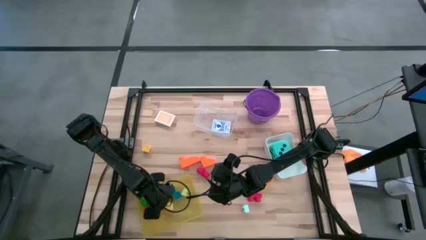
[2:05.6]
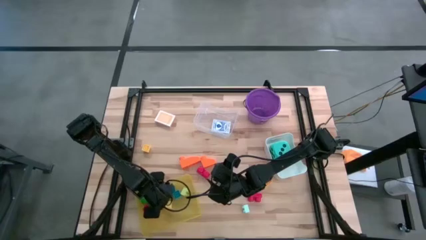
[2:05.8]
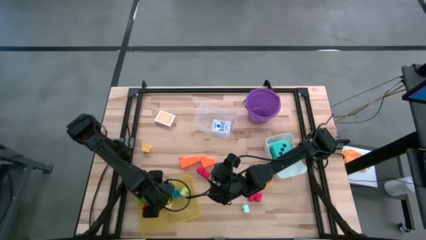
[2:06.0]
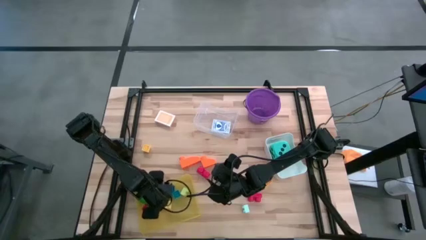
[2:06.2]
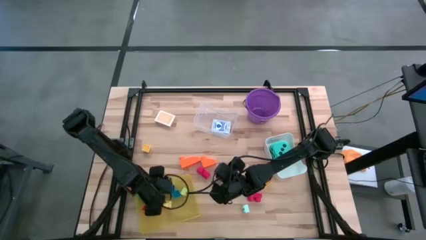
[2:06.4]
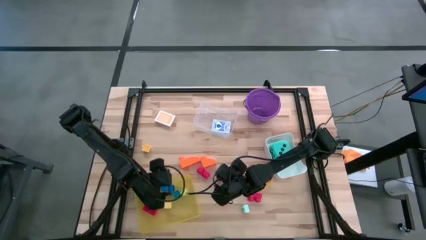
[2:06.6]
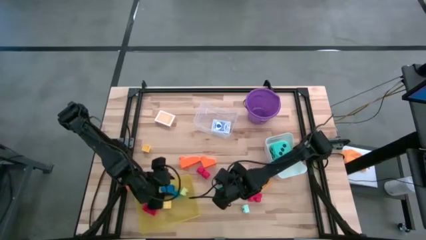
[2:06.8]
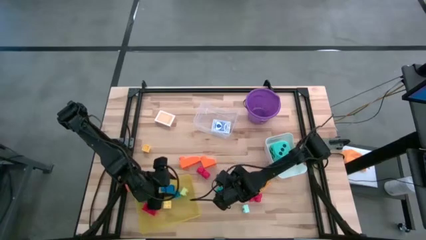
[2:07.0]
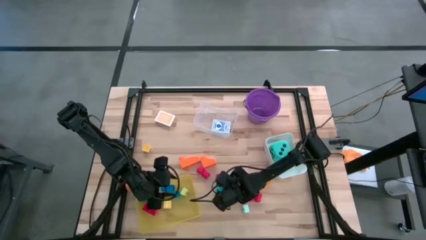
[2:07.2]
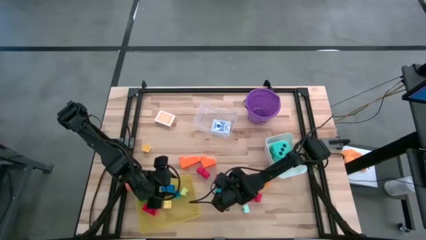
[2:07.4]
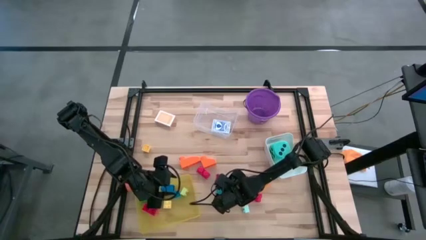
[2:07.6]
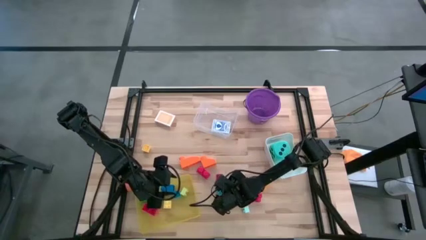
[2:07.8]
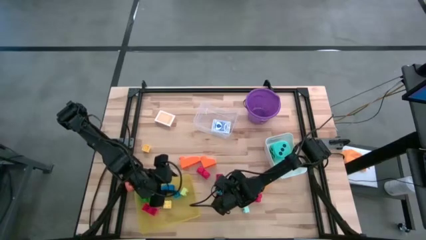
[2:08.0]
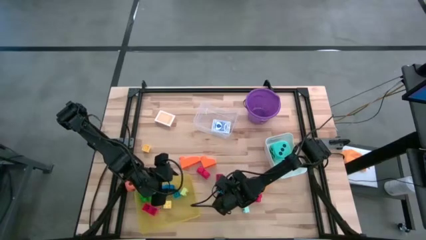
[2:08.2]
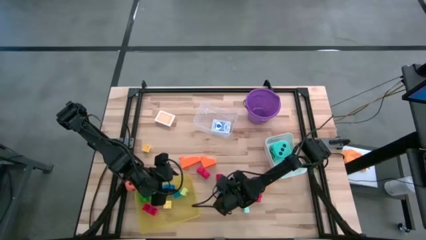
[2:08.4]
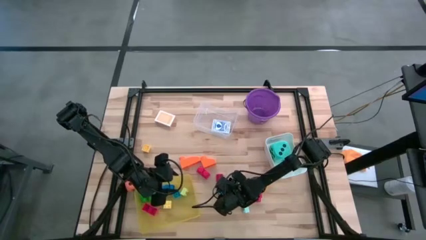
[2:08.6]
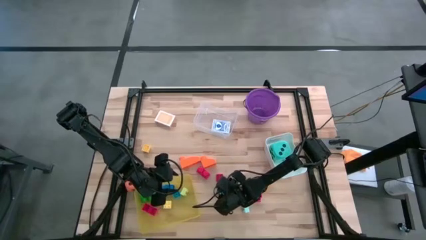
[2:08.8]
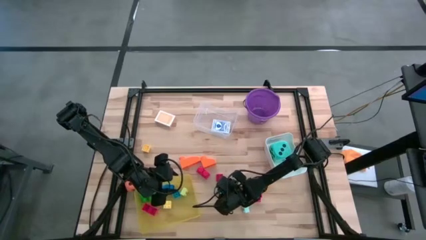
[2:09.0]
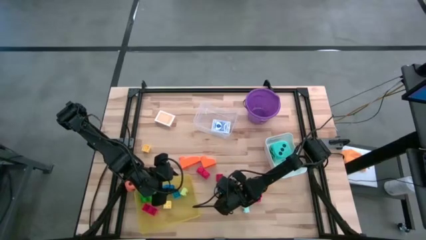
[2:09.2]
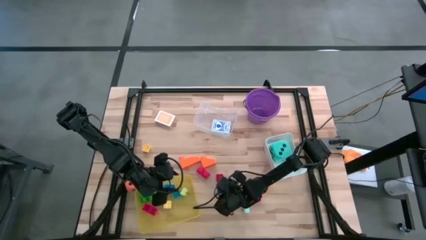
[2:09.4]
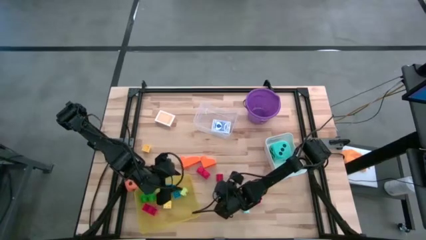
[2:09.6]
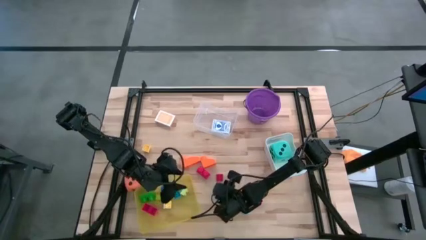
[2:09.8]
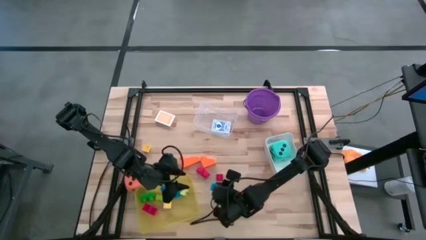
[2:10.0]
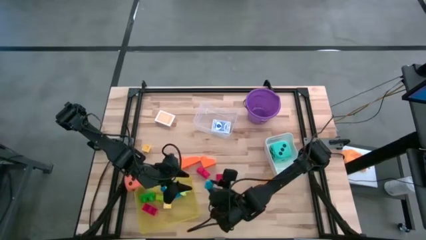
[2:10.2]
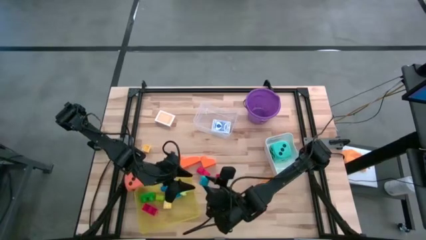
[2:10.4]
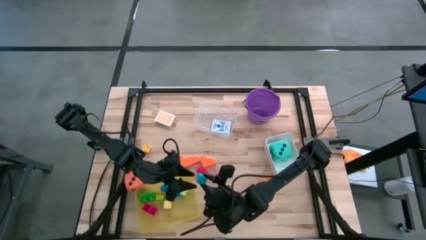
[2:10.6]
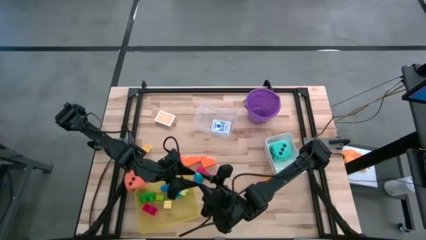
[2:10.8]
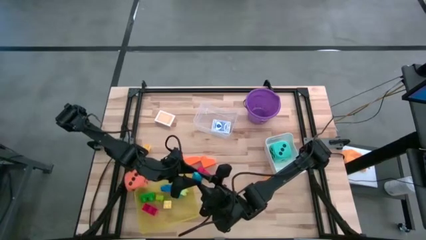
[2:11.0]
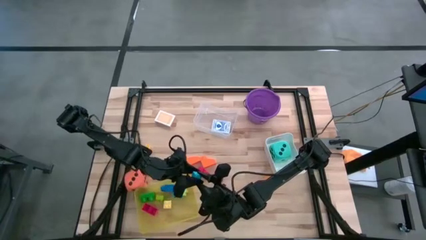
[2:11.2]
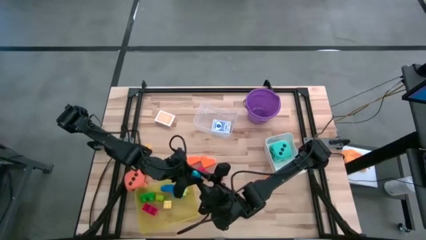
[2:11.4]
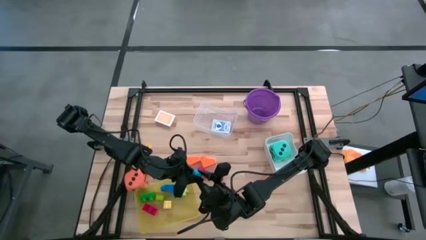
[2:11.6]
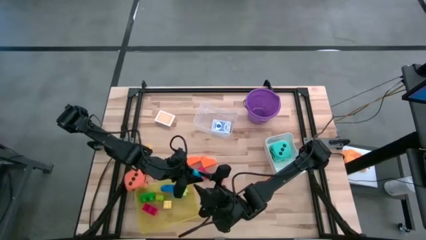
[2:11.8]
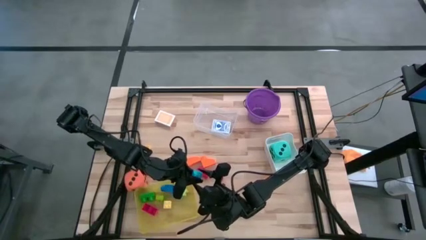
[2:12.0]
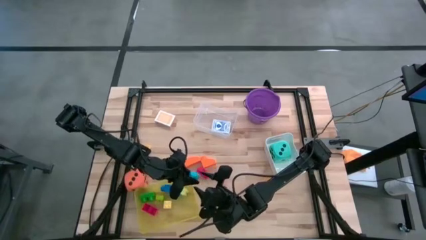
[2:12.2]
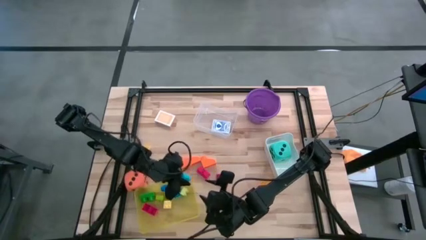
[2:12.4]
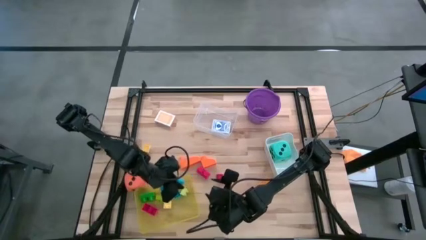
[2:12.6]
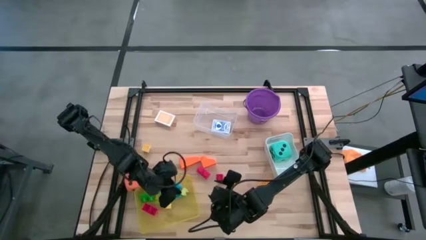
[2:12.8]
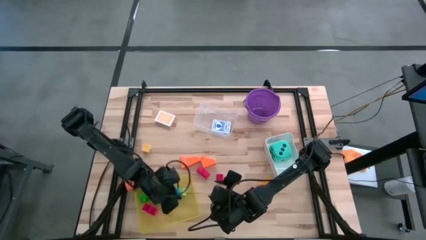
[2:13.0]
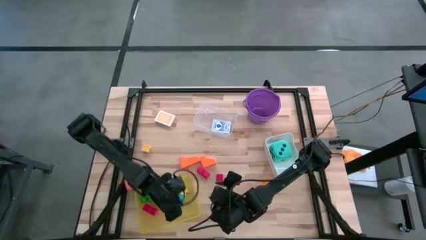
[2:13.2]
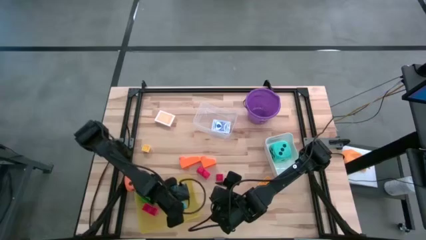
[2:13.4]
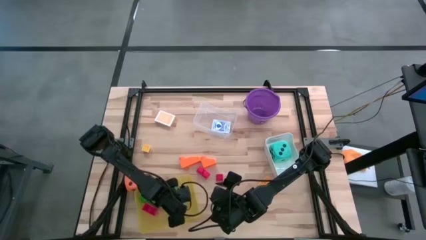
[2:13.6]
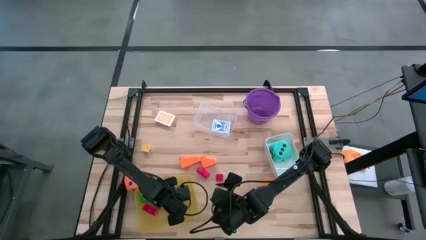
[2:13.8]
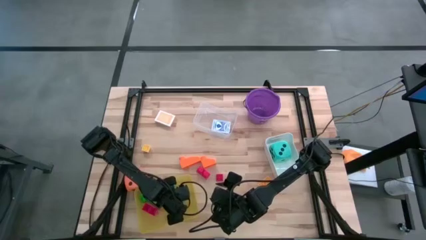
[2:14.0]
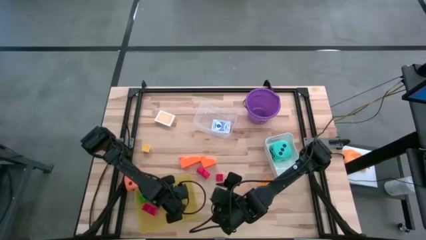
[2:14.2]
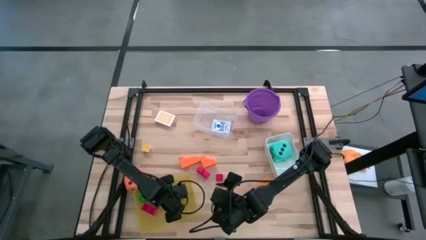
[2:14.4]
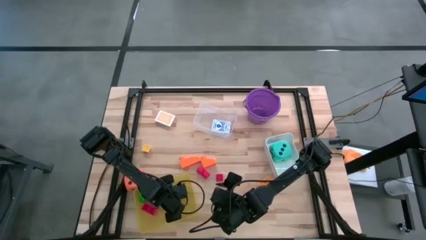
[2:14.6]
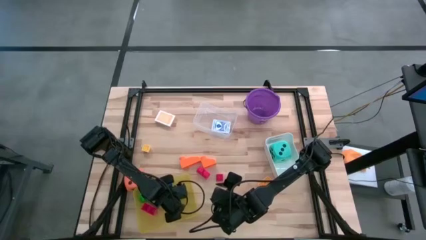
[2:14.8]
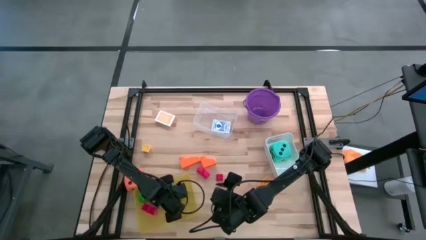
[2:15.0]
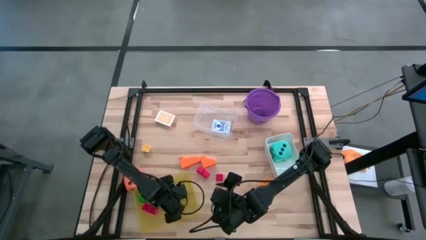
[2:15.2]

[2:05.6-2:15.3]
Task: Pick & Place Toys
Put the blue game piece into the yellow bin

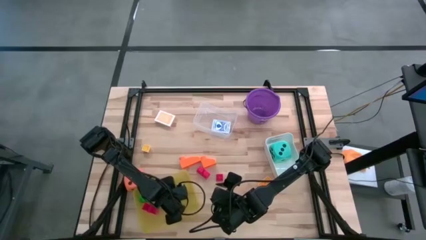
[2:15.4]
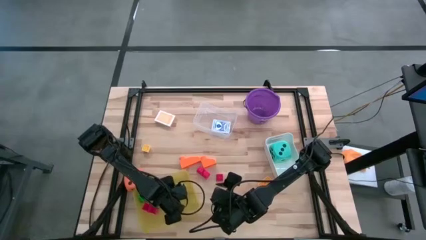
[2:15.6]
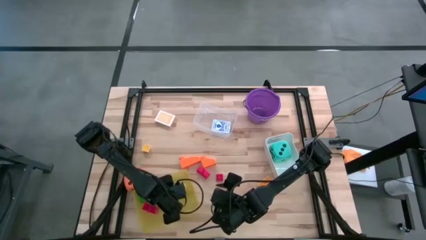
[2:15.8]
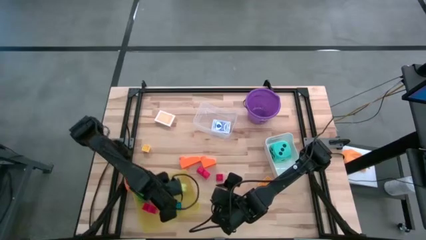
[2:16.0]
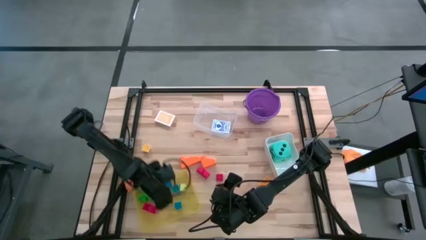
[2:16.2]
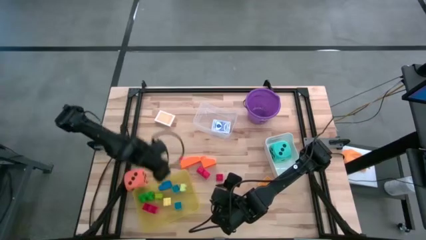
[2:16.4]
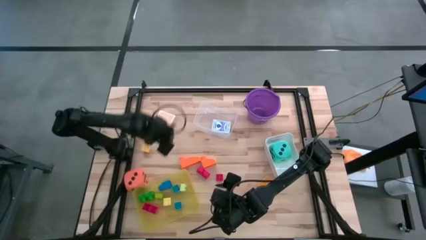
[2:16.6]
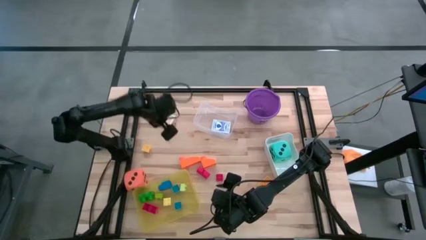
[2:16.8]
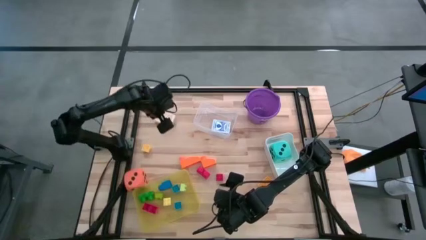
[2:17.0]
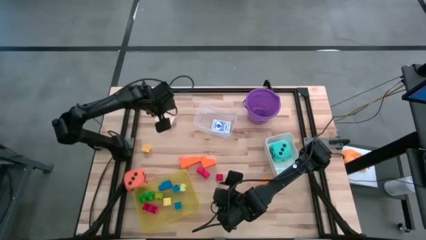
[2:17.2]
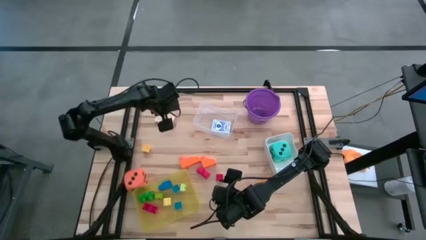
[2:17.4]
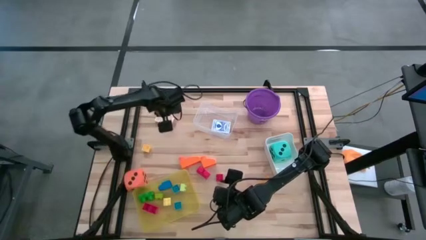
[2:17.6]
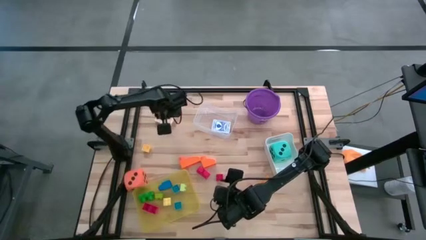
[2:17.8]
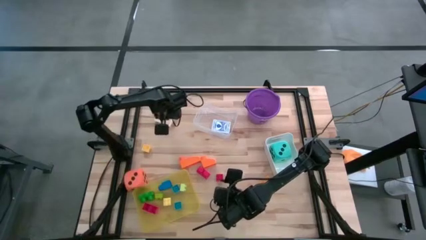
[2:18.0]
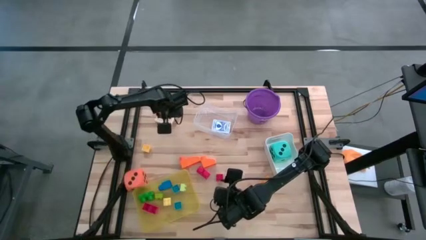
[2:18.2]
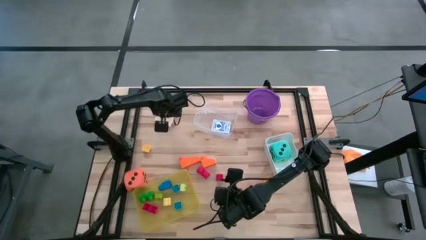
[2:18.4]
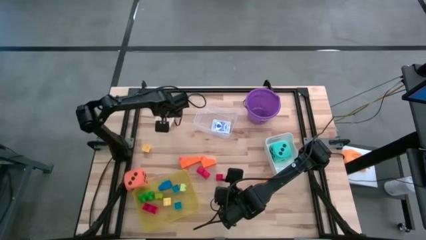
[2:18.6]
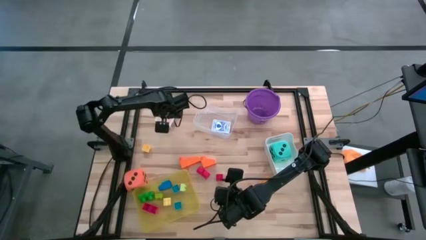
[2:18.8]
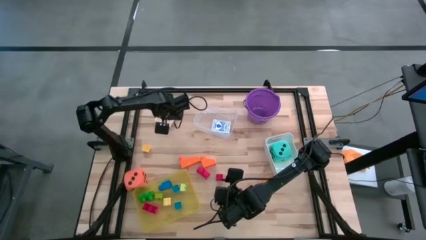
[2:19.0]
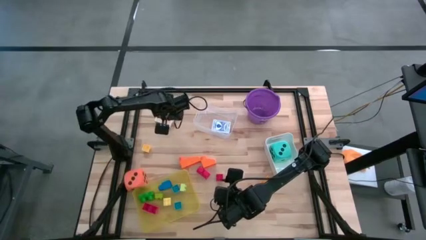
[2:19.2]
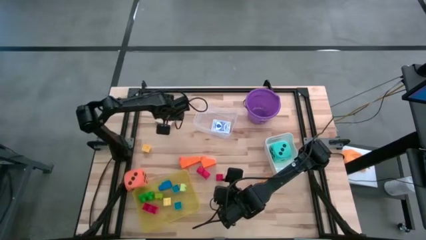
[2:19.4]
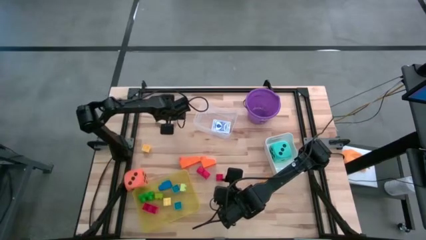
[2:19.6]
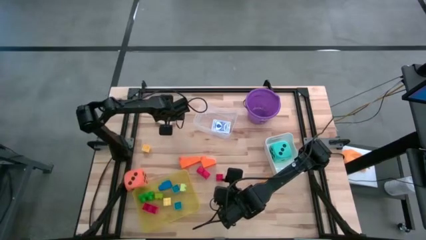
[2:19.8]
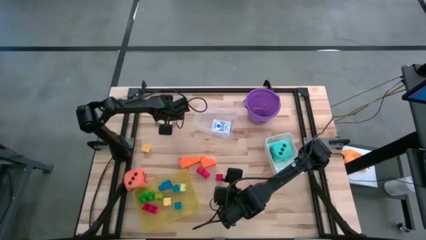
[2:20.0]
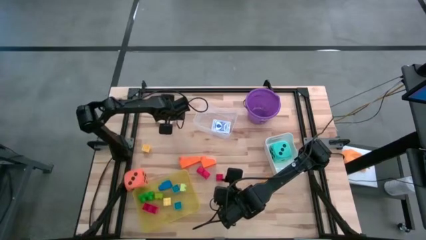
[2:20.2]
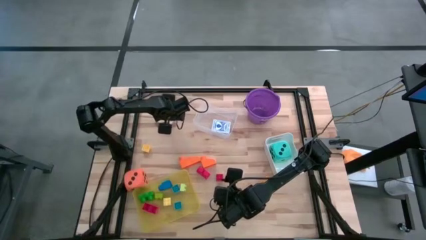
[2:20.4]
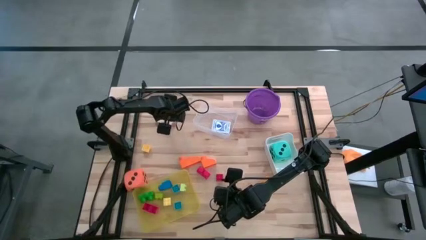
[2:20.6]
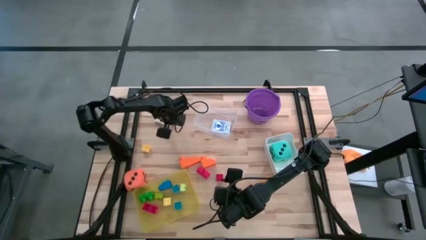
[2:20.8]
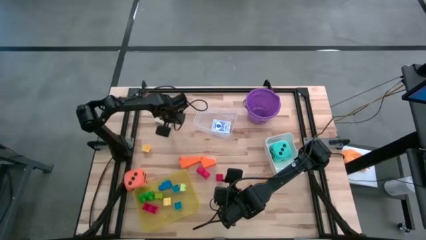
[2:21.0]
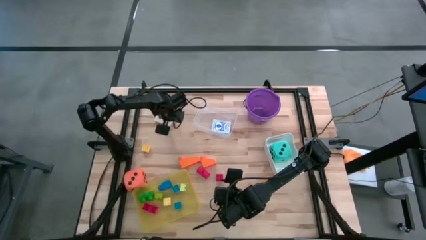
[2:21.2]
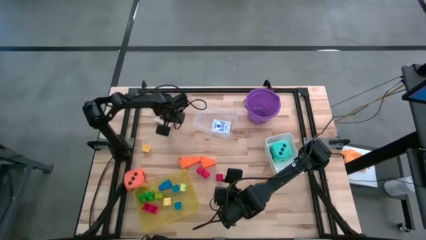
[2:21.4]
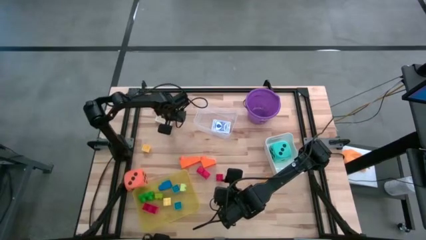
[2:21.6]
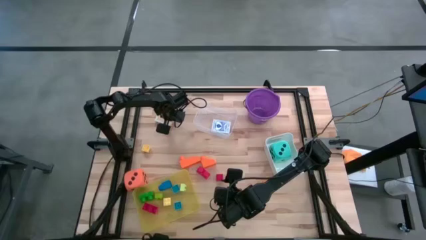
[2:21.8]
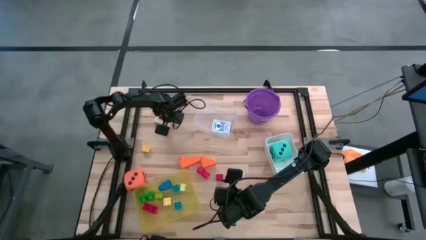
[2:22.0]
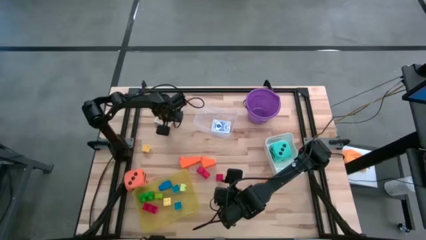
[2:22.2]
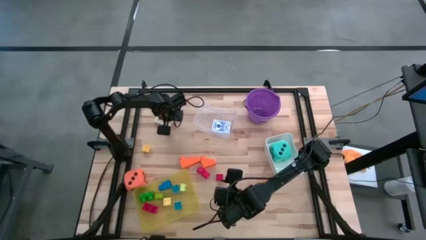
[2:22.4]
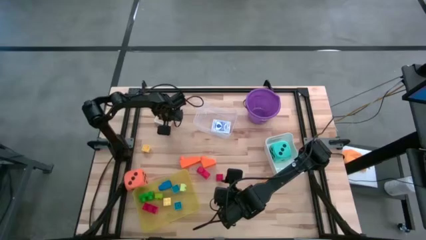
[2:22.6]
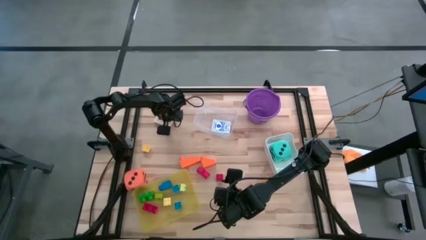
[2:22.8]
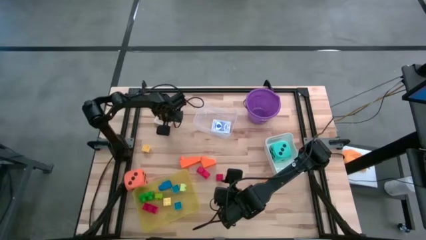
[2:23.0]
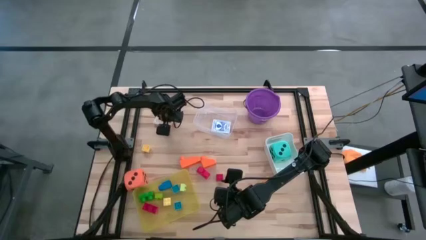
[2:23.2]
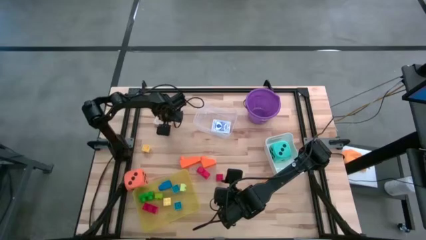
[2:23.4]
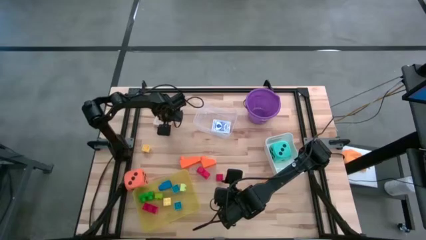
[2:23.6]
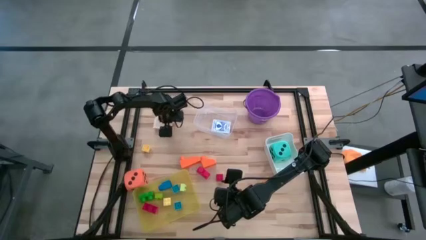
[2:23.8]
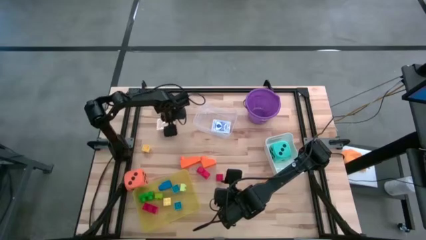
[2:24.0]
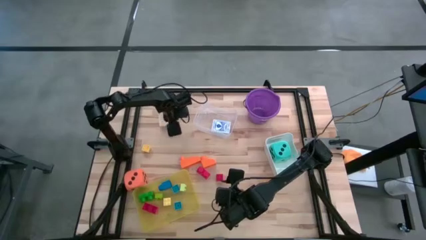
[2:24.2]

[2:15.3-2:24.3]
Put the orange deck of cards into the transparent bin
